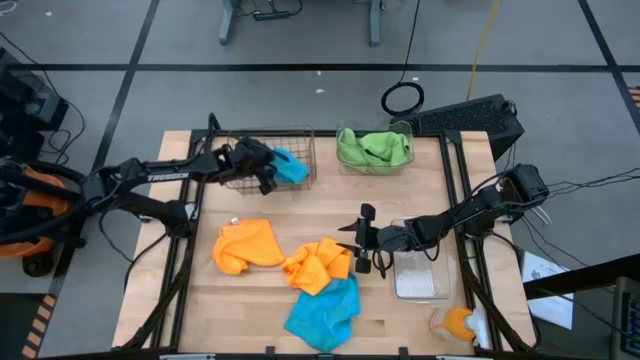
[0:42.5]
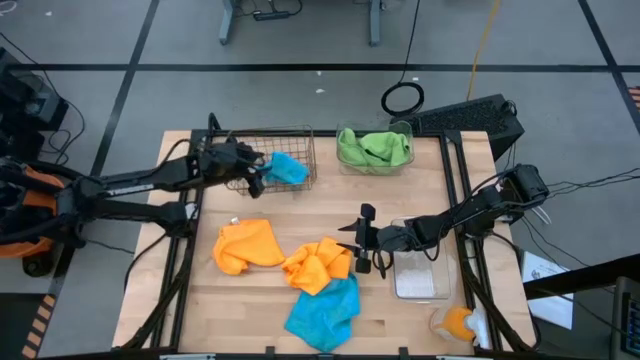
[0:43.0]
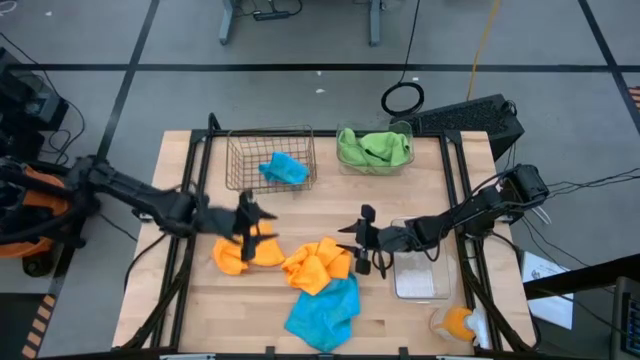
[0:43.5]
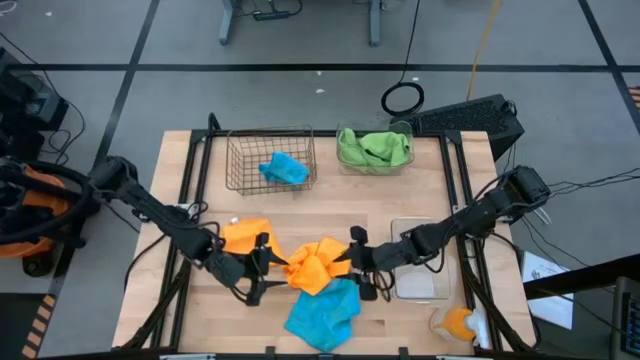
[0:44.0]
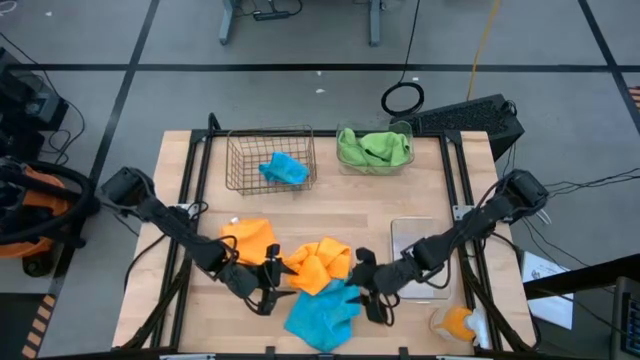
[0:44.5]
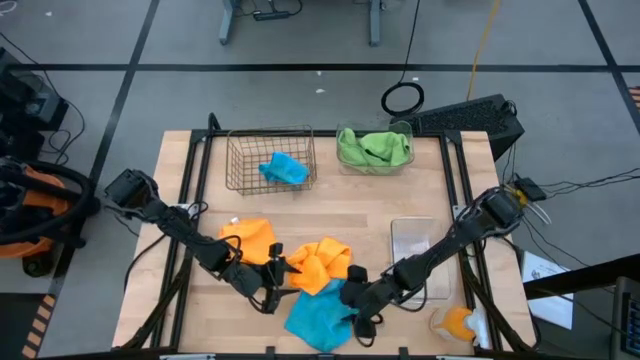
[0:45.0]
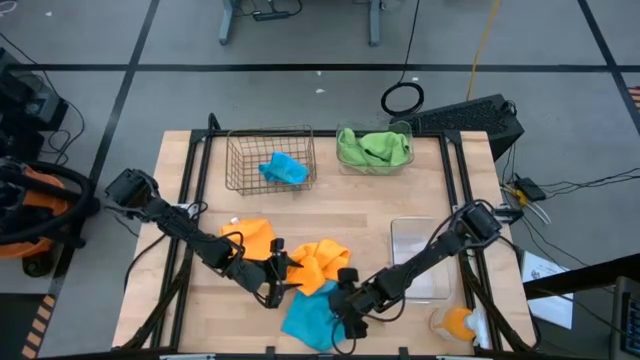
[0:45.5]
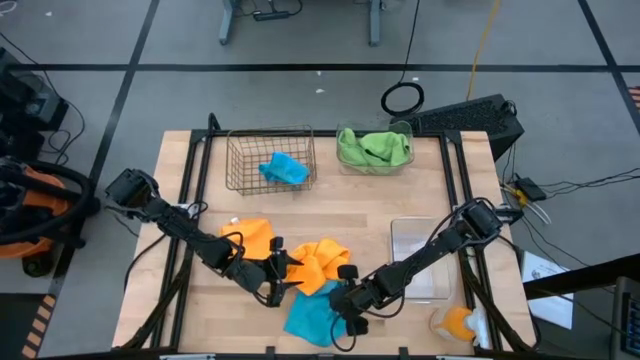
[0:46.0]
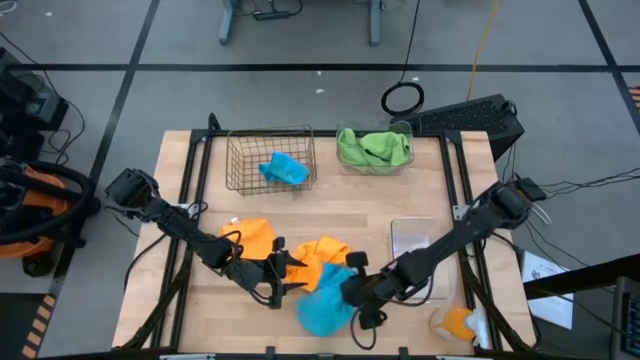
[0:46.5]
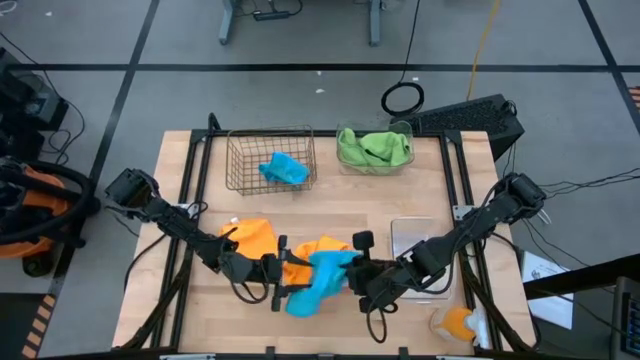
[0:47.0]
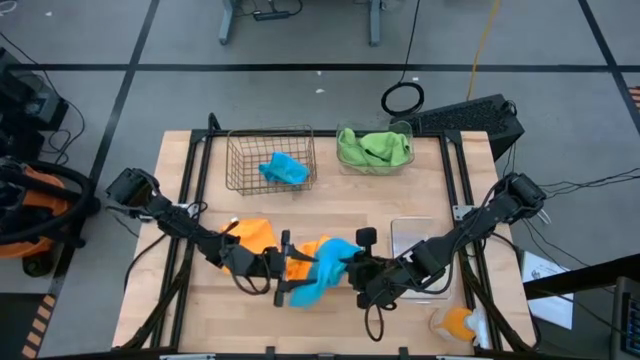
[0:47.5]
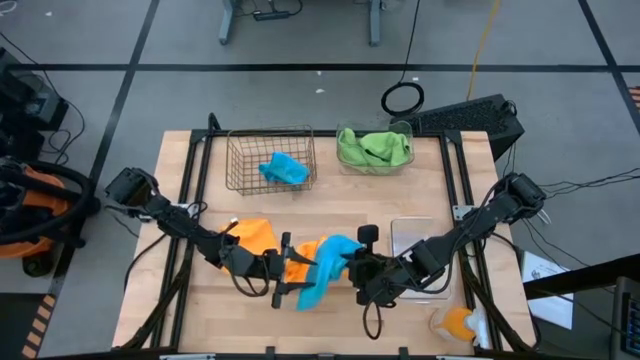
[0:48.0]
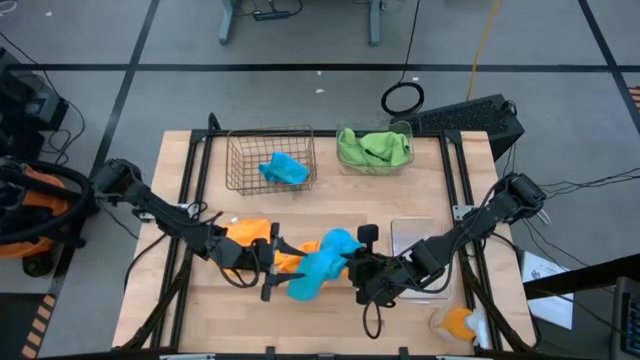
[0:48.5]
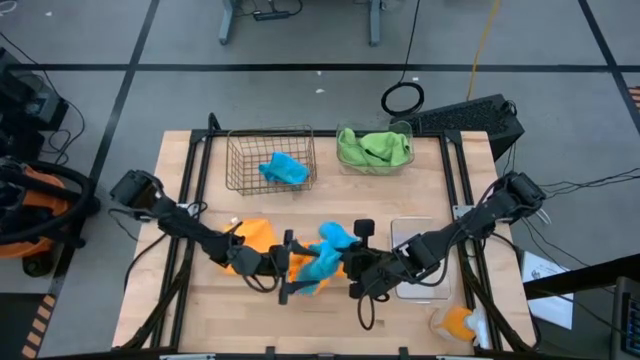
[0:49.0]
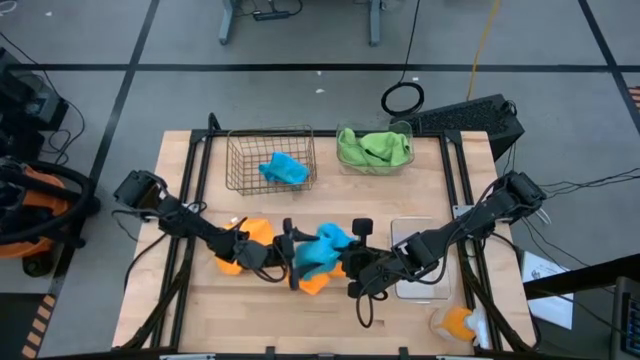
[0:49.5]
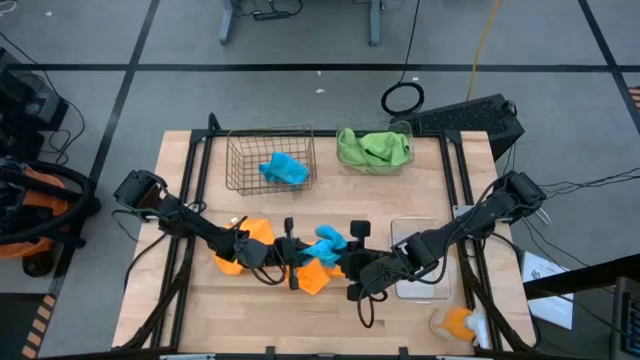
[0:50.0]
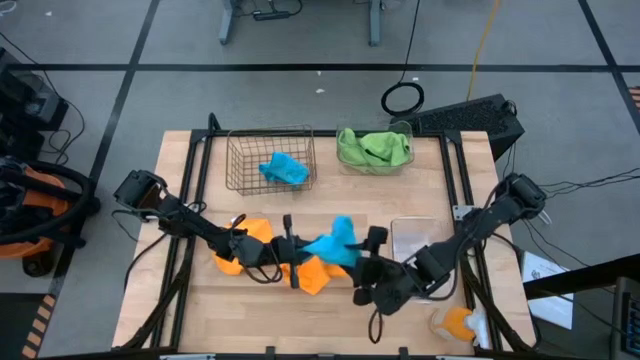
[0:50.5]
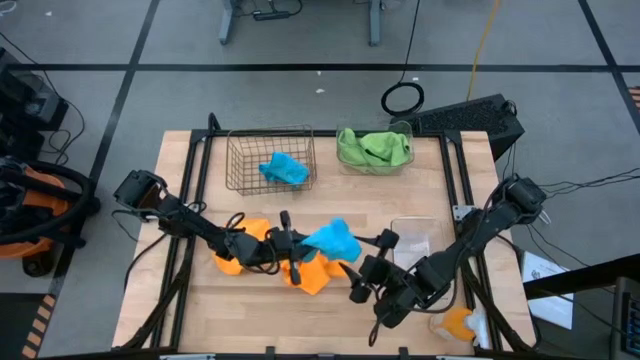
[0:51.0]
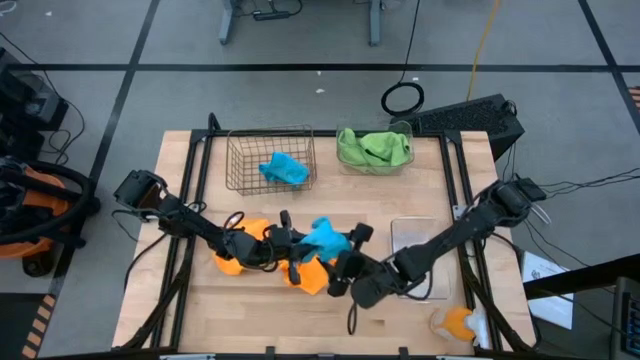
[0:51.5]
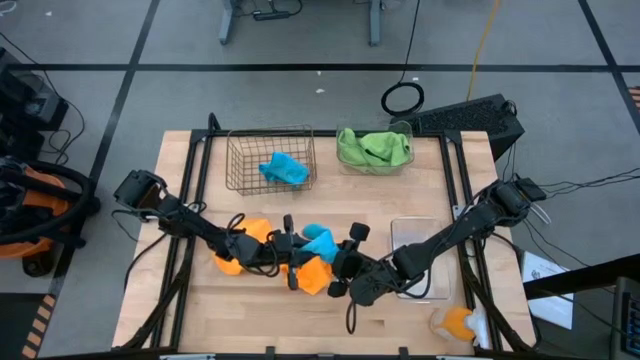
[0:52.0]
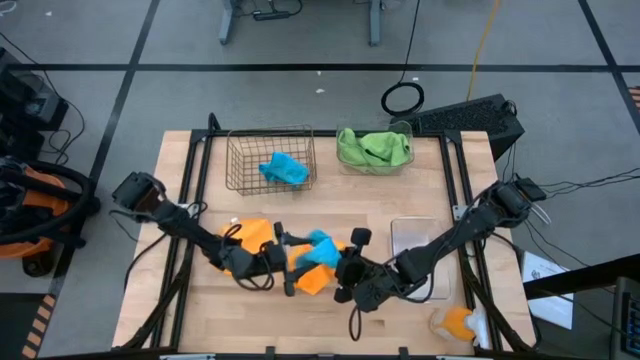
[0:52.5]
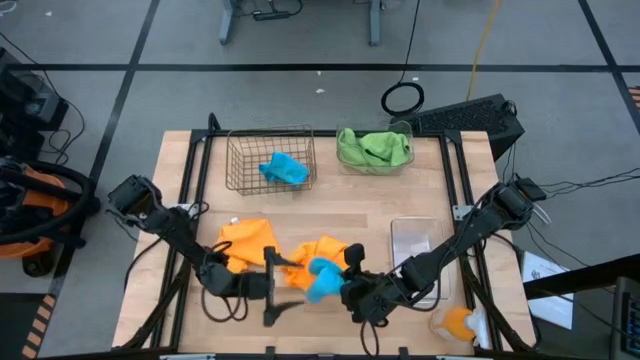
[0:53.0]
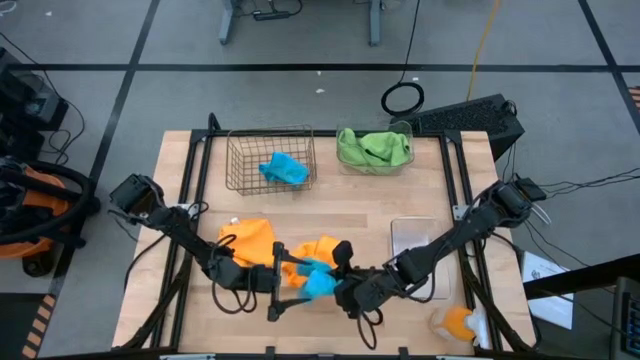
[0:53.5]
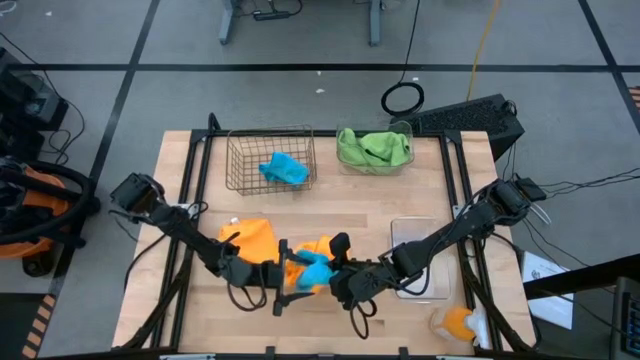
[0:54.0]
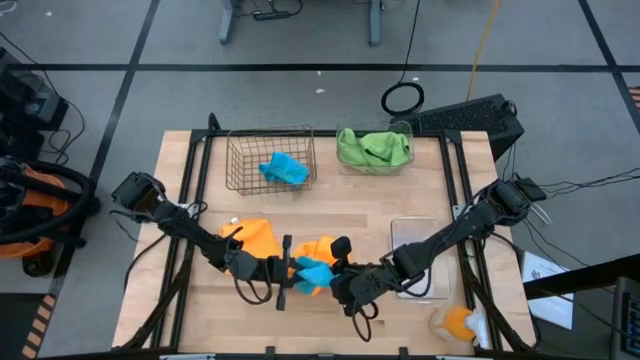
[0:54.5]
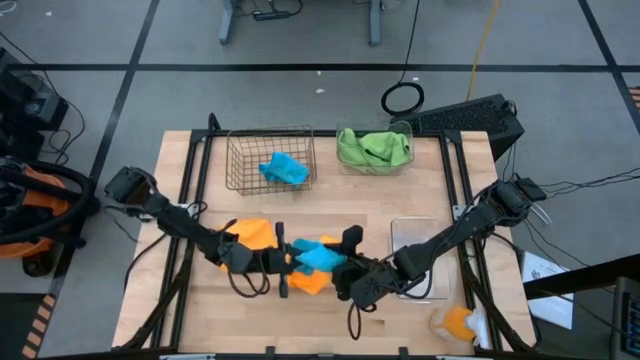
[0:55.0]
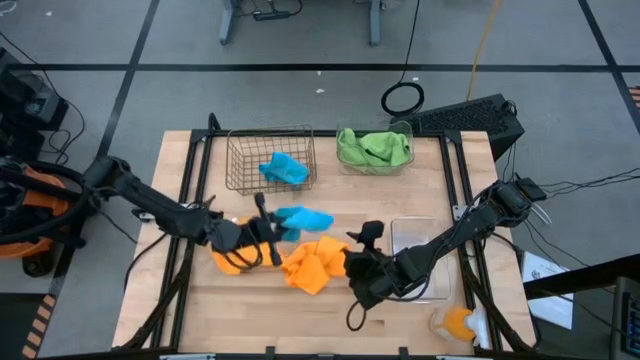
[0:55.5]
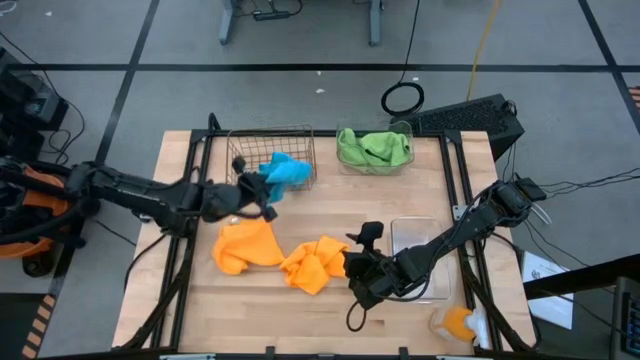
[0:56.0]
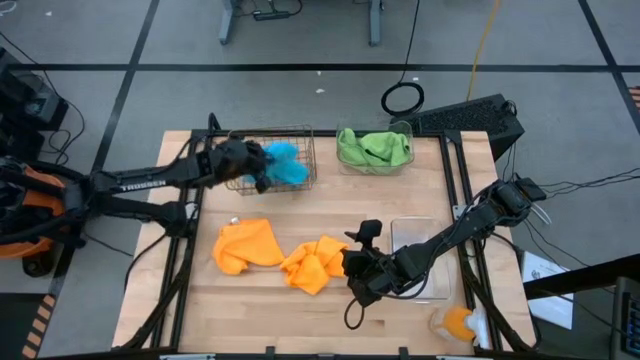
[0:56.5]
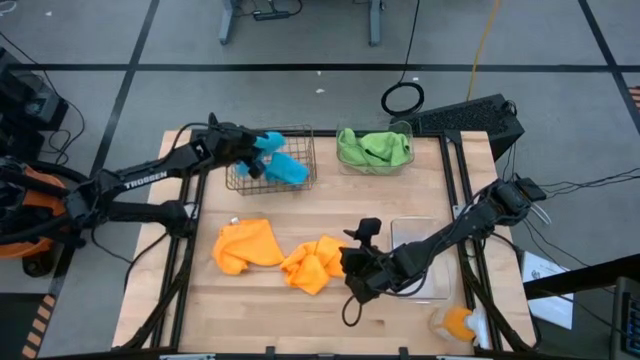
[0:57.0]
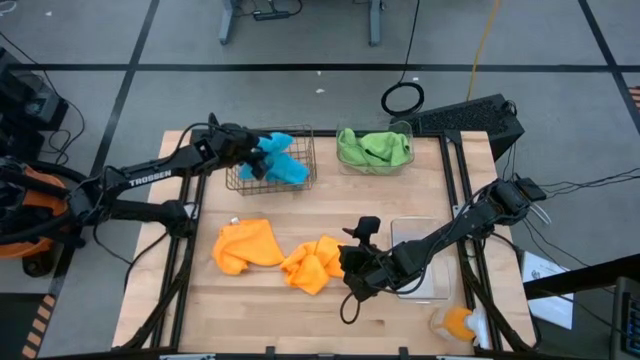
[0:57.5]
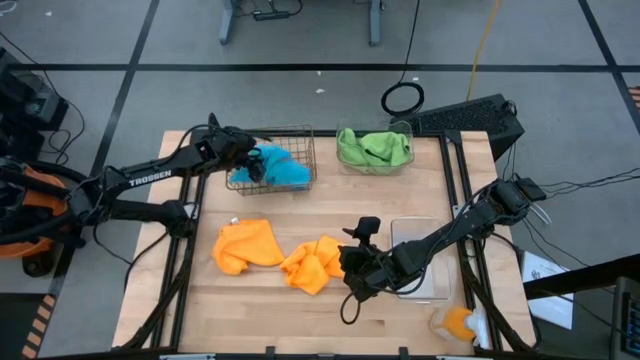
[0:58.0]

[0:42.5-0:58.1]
Task: Sort microfiber towel by color & place in baskets
Put the blue microfiber towel into the wire basket
